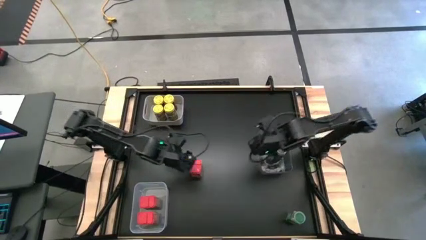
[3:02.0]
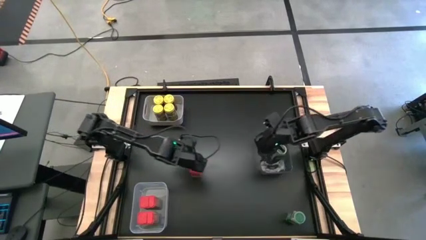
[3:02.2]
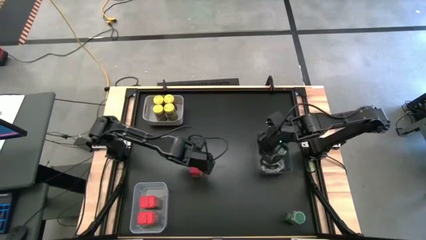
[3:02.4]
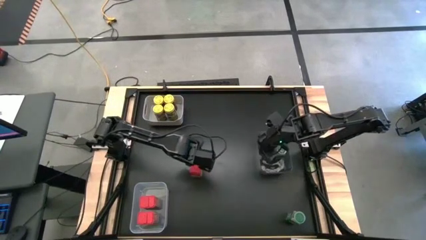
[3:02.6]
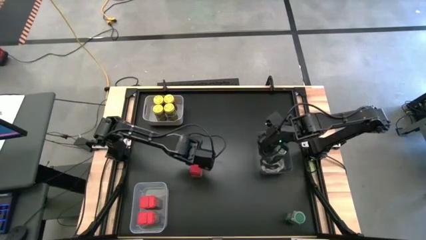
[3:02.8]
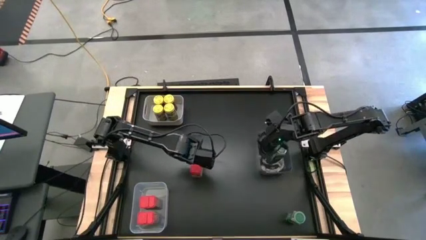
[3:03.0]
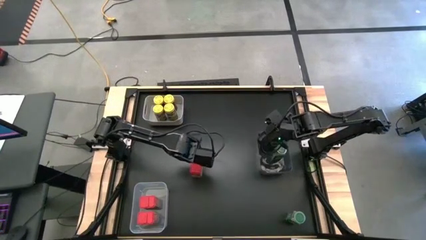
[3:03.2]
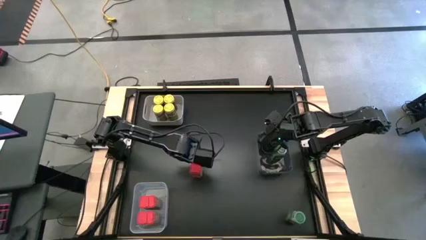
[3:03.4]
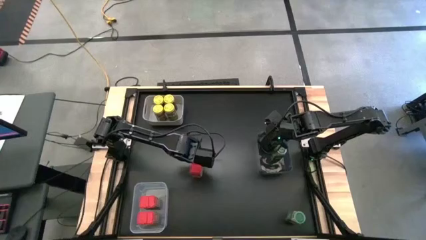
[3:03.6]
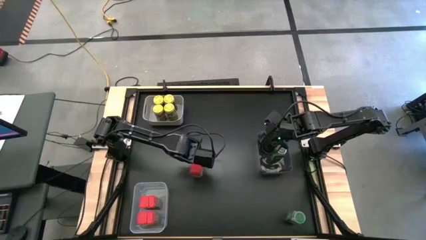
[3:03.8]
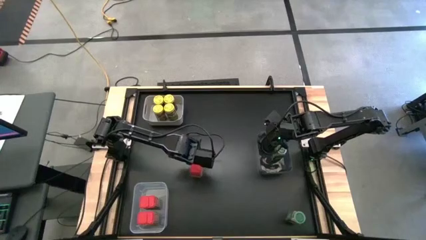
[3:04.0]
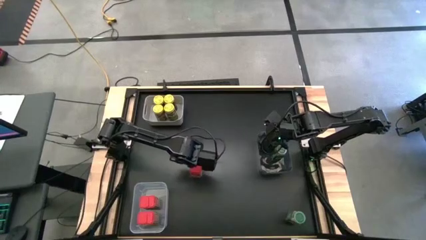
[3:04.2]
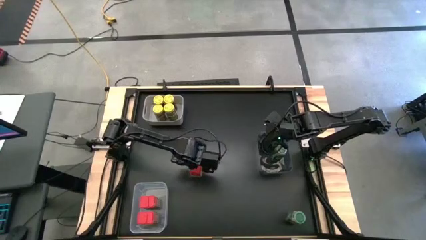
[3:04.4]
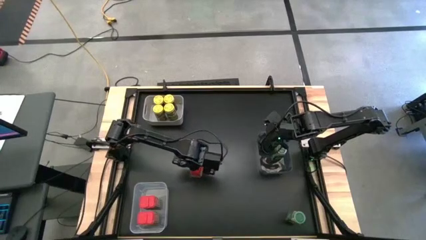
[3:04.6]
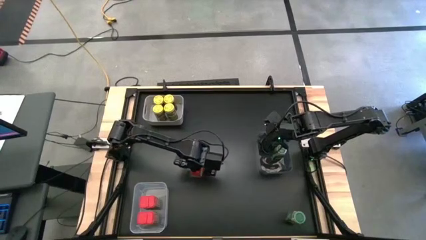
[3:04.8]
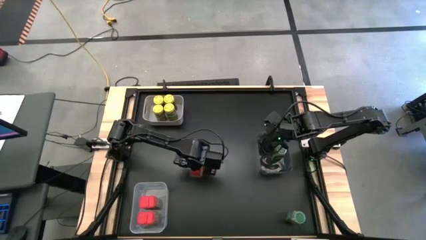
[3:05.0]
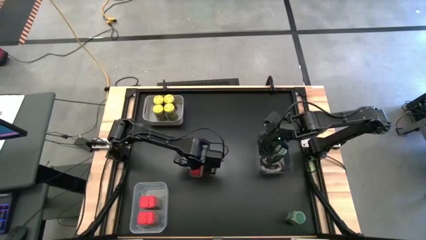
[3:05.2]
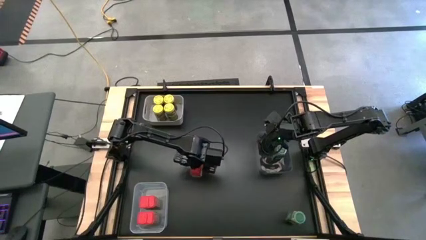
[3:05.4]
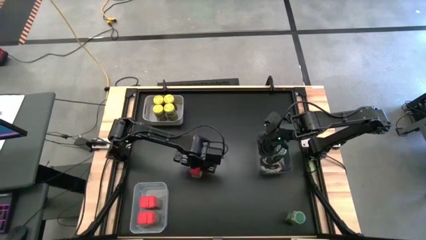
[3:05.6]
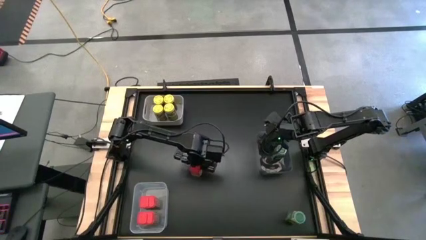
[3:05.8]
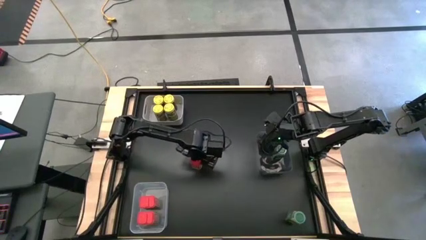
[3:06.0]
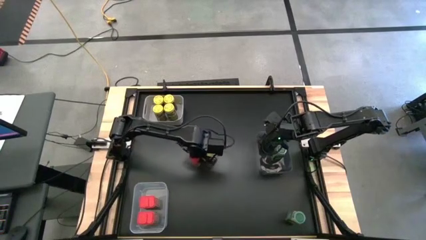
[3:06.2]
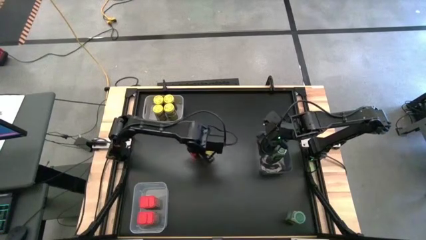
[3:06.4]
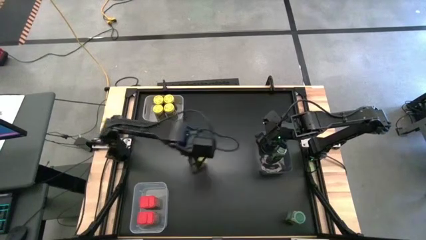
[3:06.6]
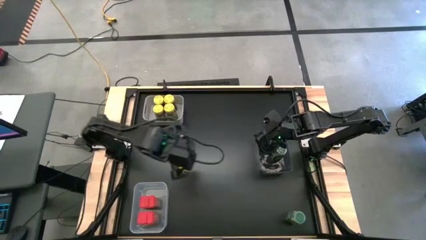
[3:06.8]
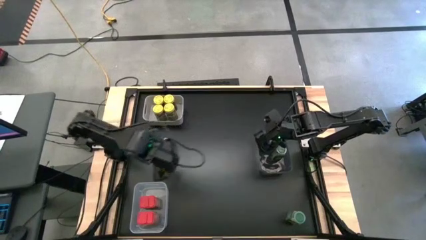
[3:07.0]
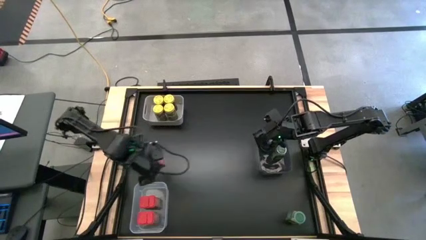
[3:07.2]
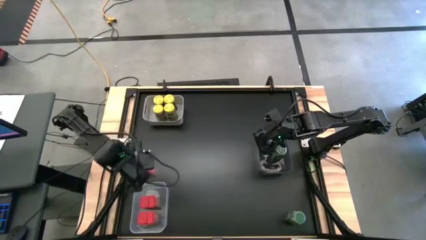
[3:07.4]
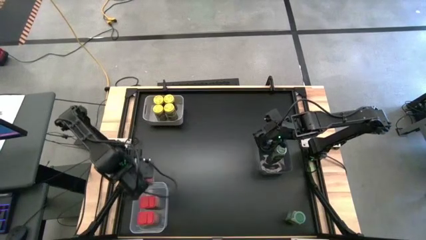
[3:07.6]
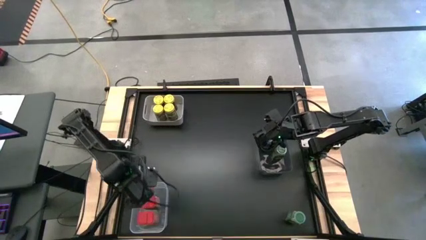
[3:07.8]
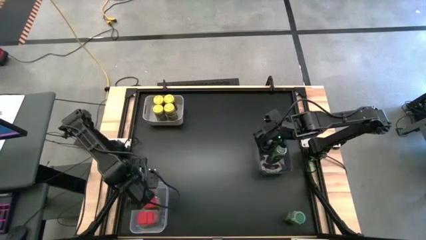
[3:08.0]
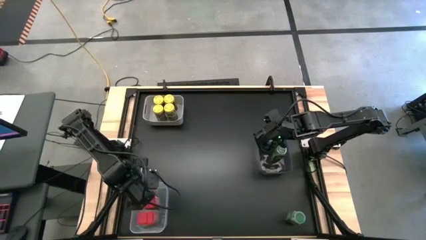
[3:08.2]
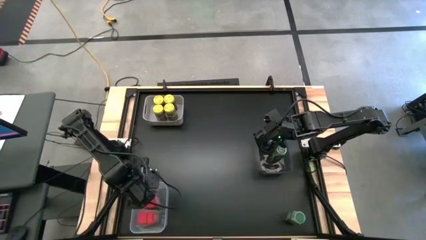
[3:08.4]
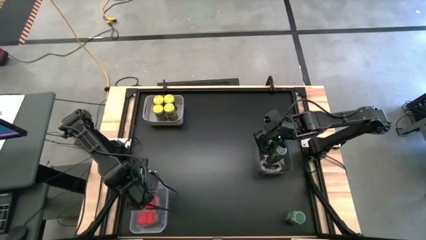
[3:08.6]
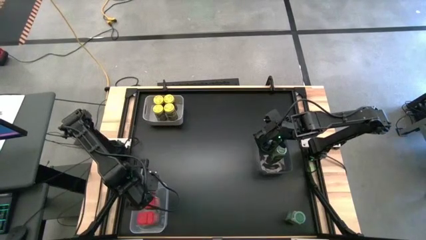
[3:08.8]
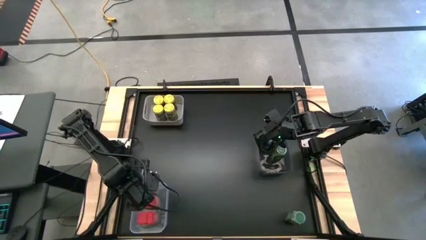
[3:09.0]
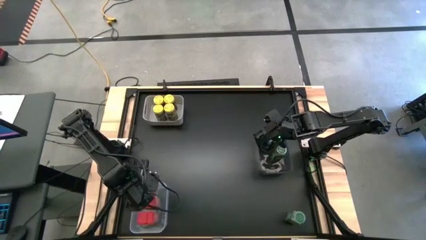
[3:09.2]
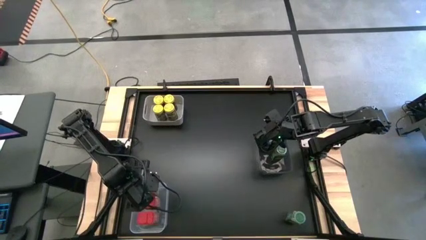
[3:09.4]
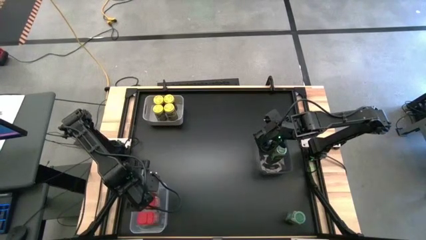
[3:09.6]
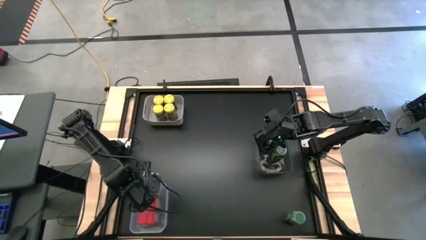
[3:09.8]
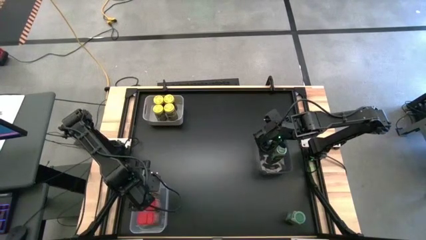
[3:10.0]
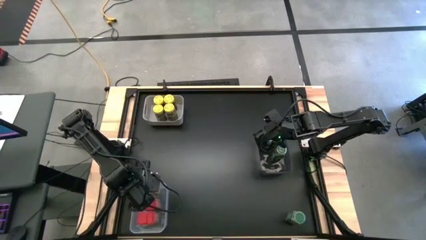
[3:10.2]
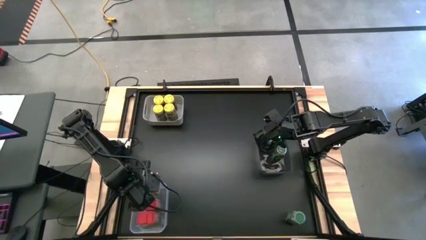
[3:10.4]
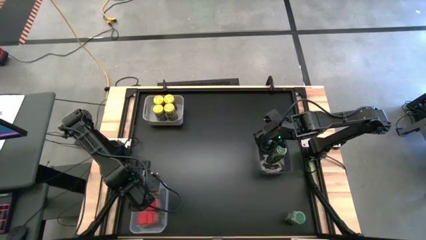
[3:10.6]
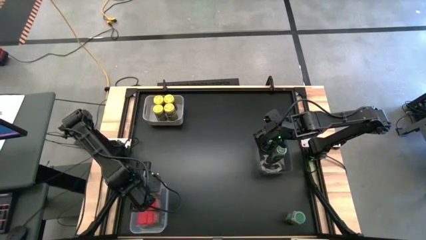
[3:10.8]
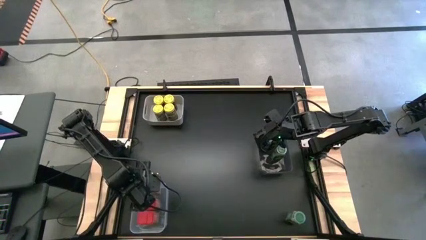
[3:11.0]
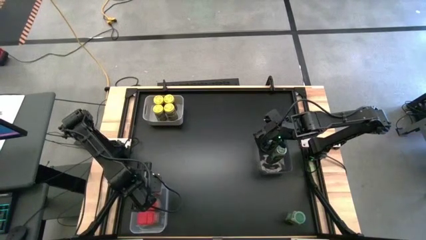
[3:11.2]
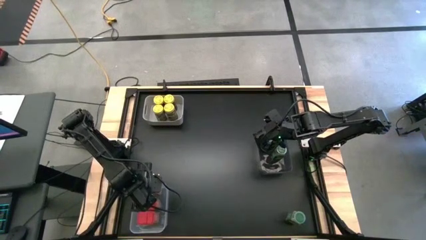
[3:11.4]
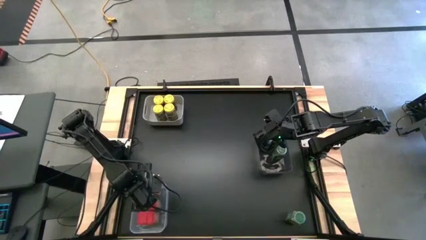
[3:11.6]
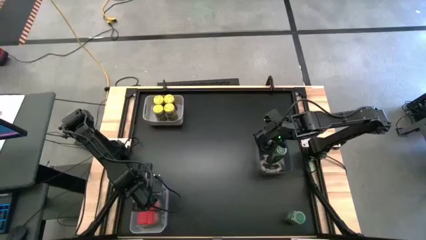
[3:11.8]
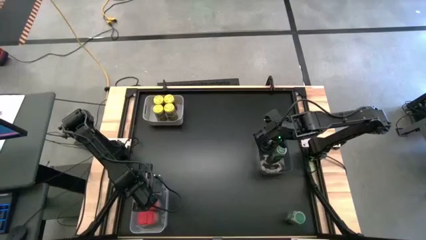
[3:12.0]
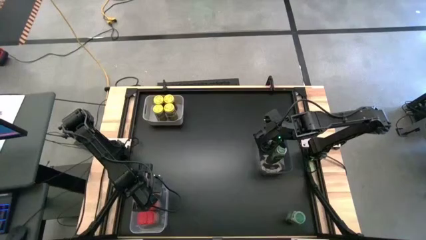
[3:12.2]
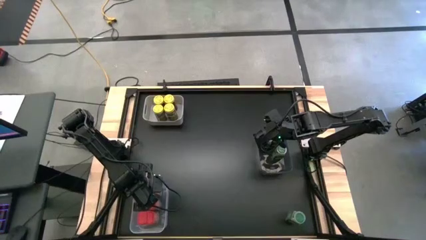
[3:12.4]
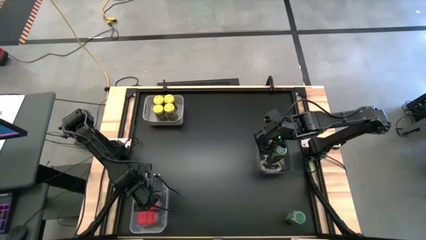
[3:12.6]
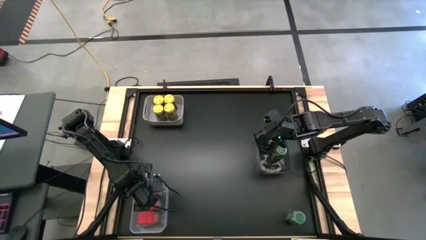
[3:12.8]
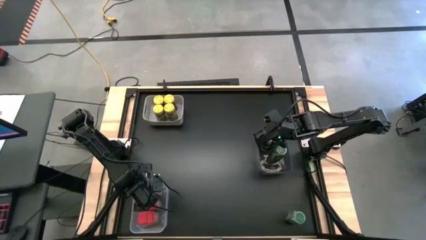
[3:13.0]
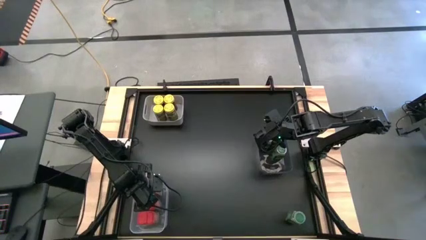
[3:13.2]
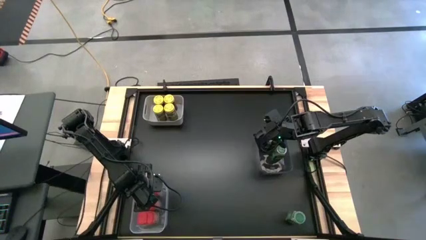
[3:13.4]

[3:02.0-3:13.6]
Task: Sort spices by type
Put the red seasoning can into the transparent bin
